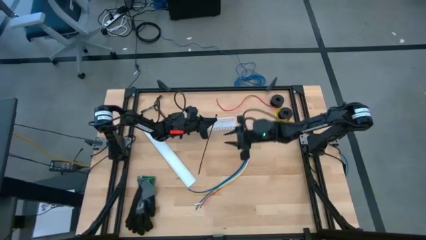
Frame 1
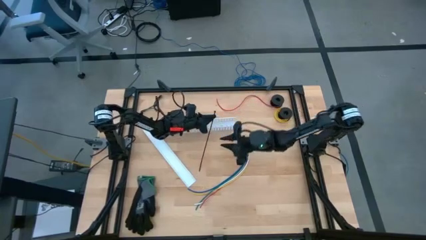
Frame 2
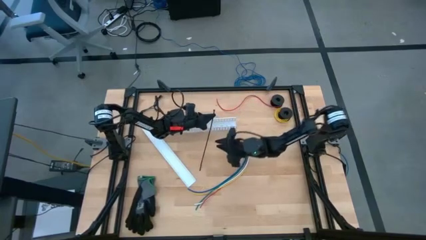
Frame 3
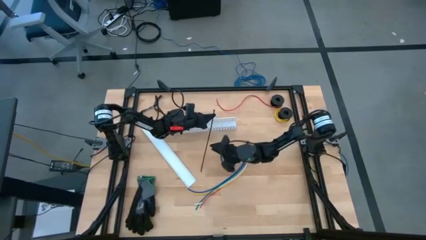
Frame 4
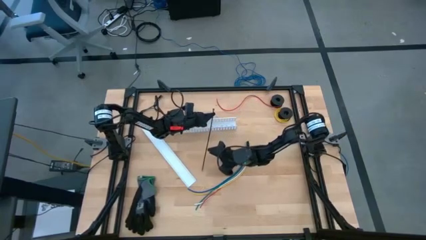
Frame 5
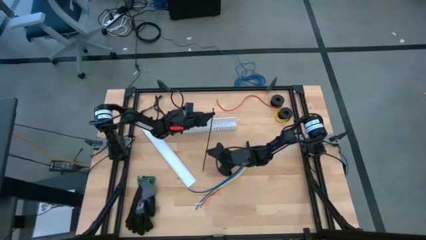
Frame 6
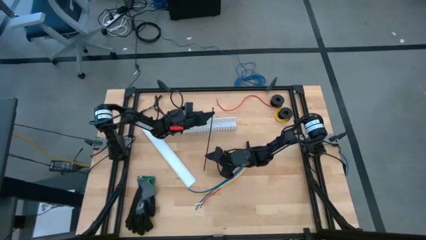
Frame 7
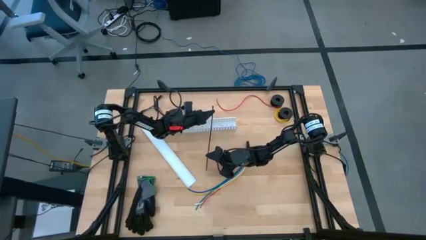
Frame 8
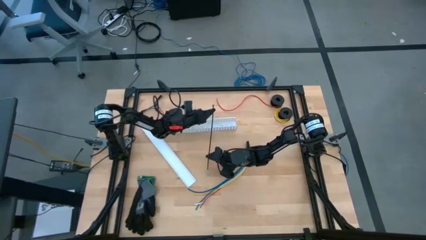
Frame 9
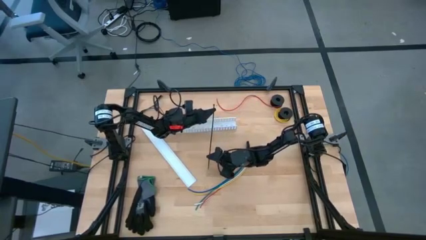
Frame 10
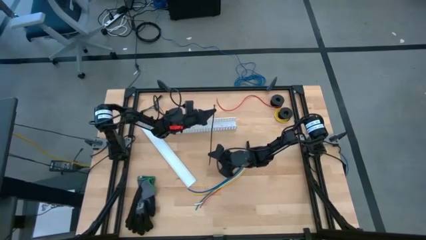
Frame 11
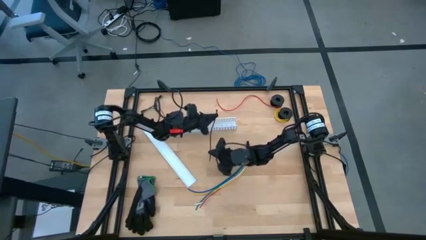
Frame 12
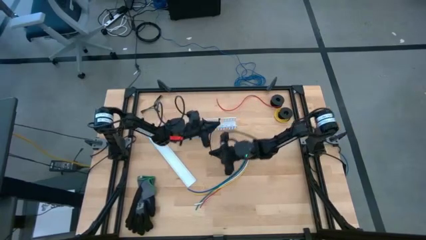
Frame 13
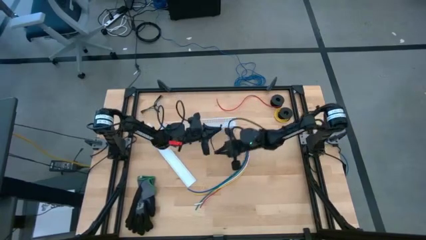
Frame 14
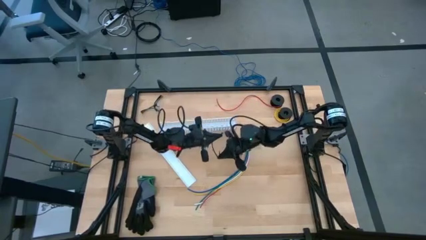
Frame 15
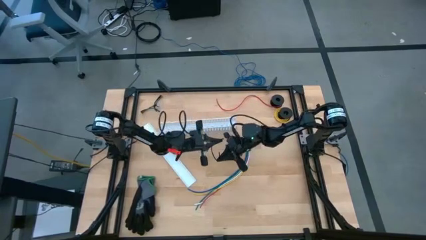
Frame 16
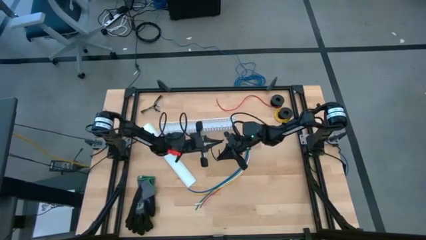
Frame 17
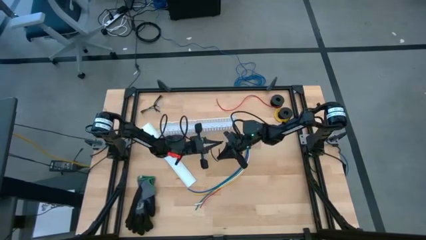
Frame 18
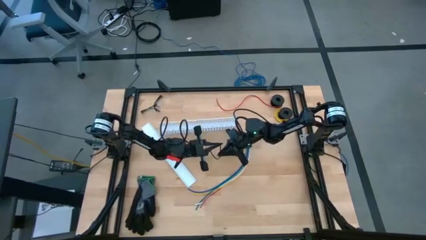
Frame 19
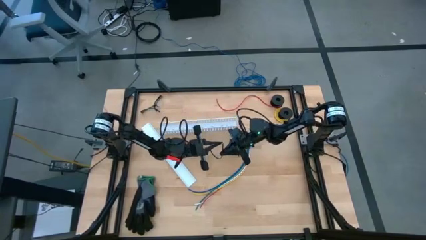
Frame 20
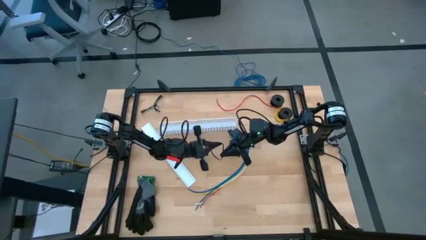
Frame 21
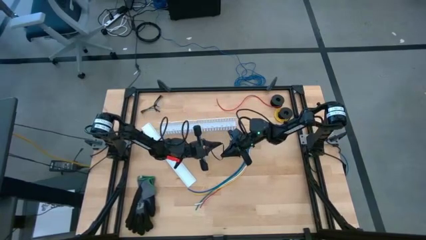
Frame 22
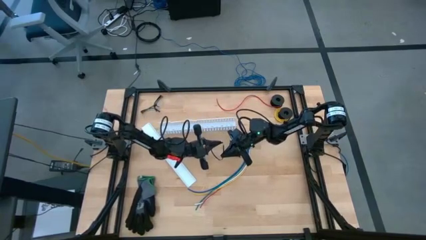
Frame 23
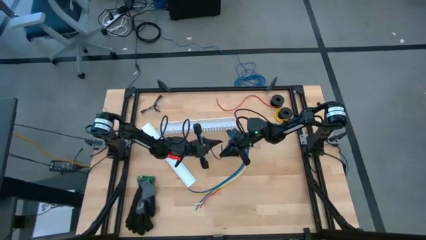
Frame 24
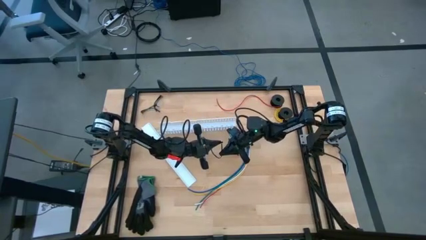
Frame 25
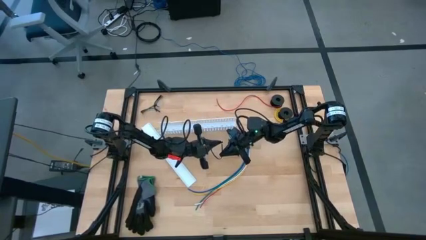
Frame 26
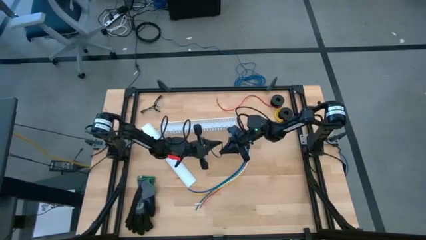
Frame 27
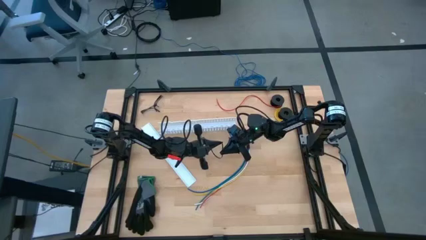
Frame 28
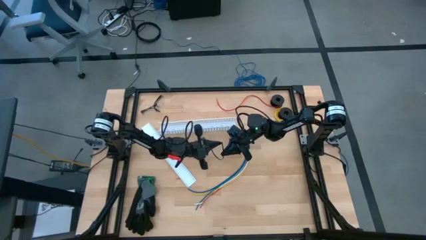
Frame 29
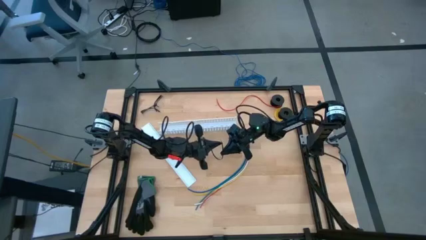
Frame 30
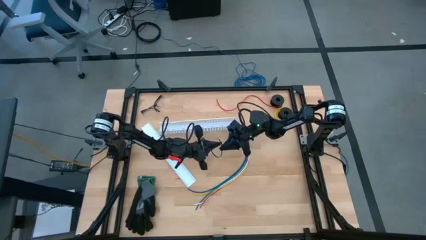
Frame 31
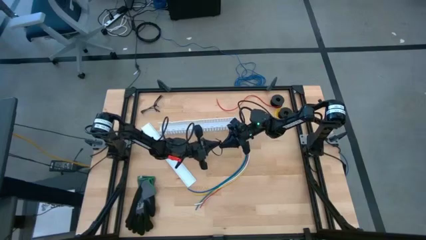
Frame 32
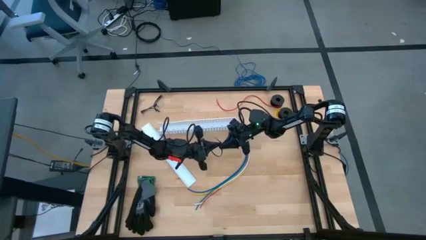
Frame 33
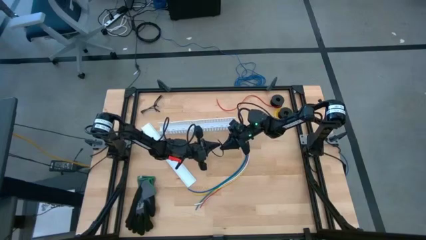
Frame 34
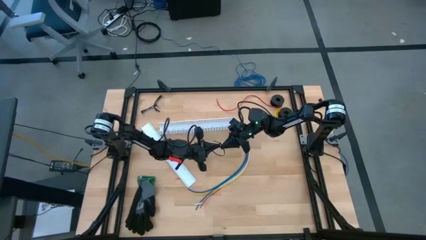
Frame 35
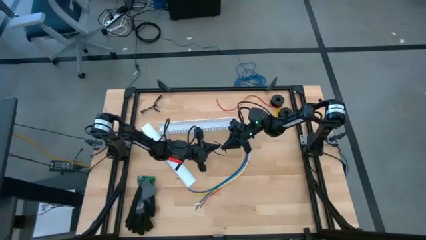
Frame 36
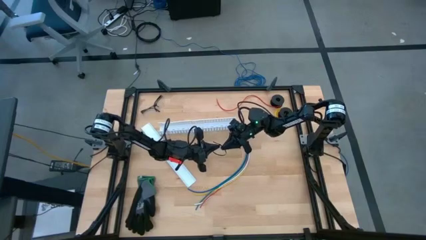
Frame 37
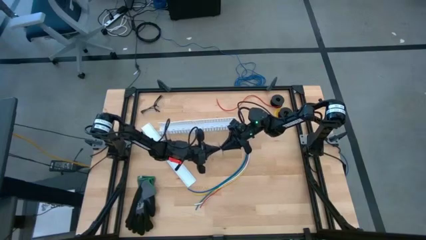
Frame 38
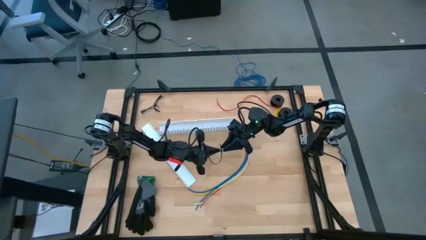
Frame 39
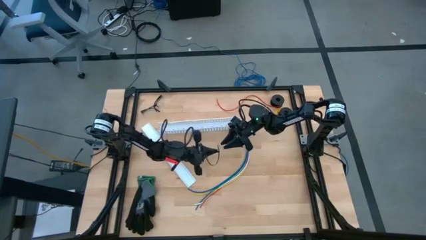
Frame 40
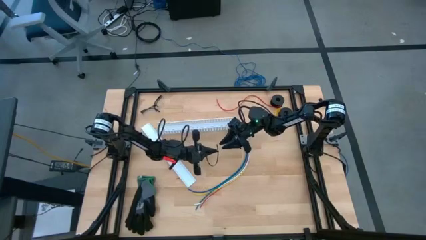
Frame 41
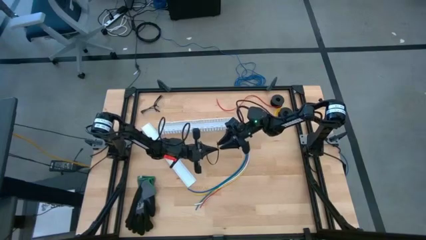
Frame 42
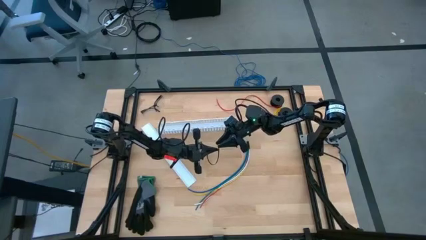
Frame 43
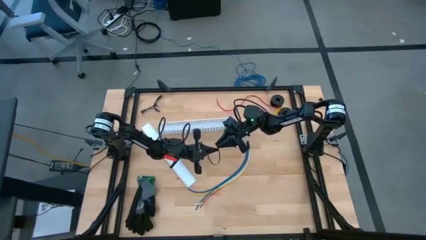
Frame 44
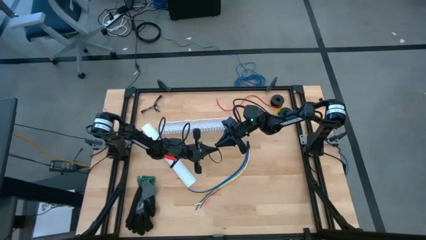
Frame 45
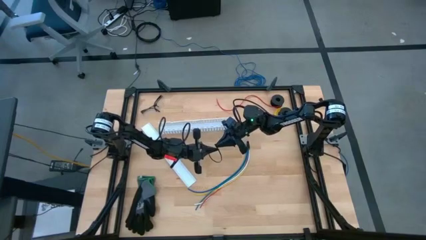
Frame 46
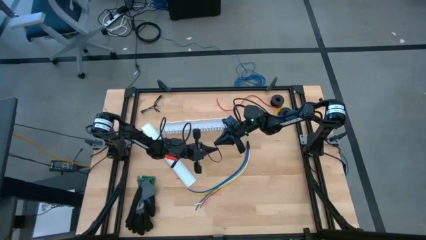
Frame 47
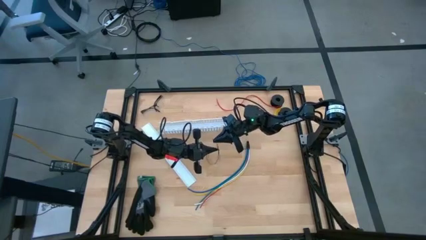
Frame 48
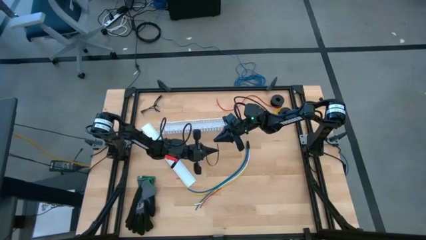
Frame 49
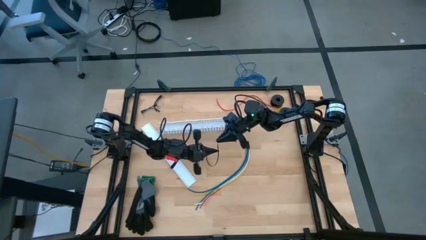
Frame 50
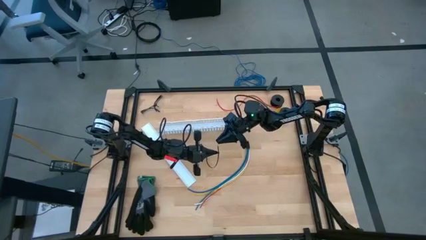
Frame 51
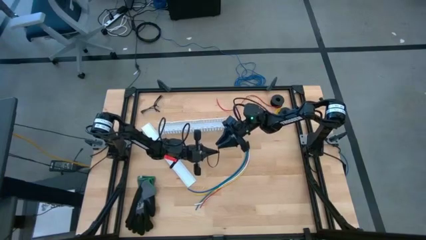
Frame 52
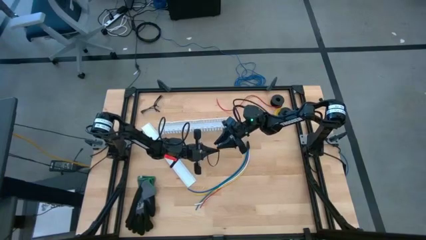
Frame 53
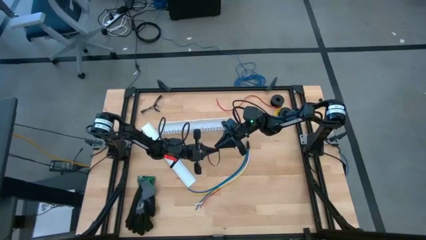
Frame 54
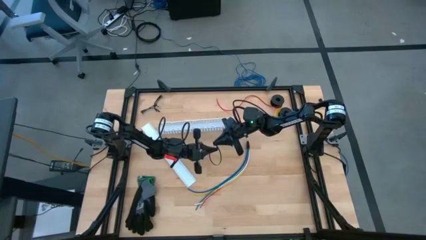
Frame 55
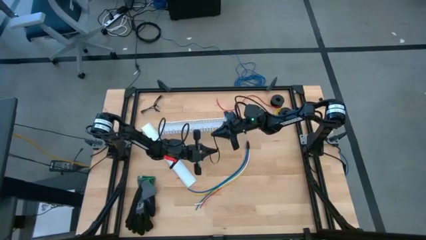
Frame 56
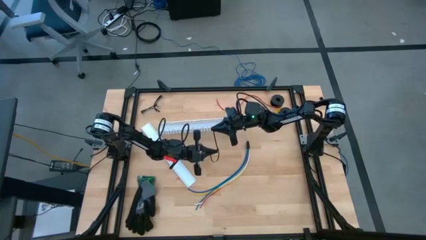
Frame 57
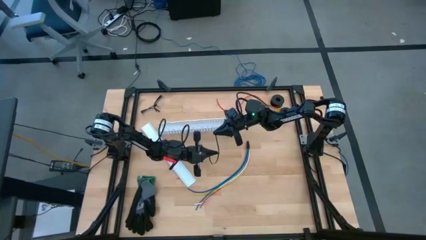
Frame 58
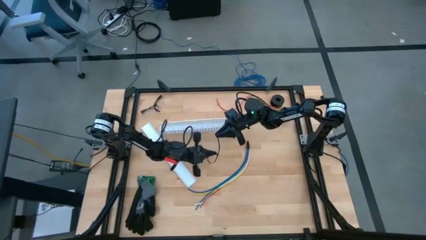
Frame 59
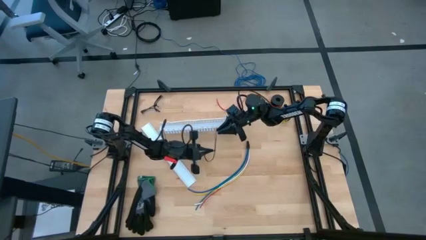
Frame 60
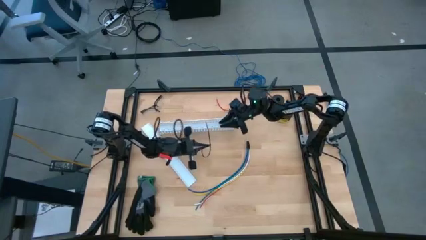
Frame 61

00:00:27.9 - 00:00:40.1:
Task: Ziptie cables
Prepare the black zip tie

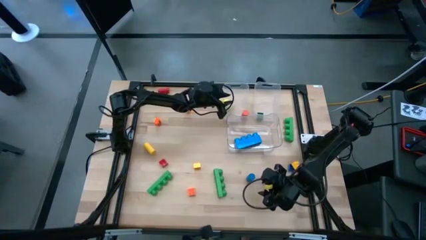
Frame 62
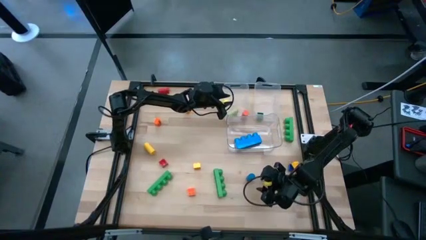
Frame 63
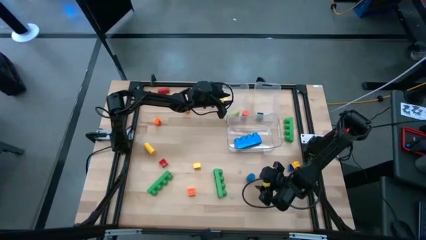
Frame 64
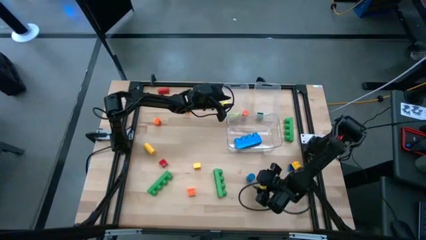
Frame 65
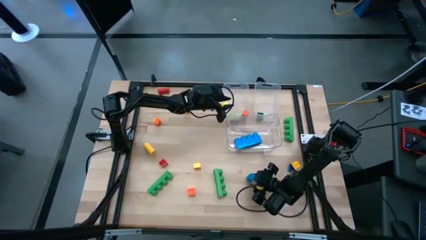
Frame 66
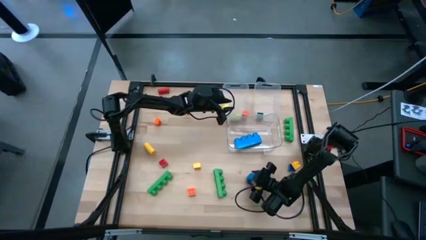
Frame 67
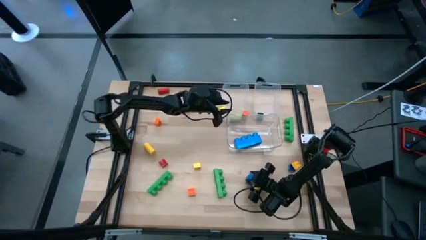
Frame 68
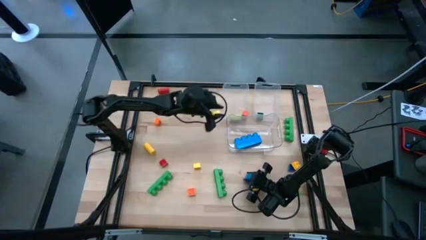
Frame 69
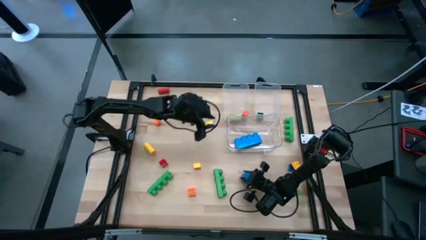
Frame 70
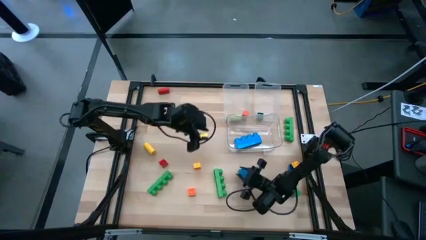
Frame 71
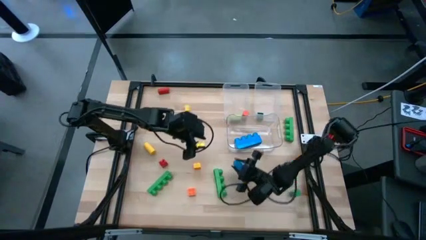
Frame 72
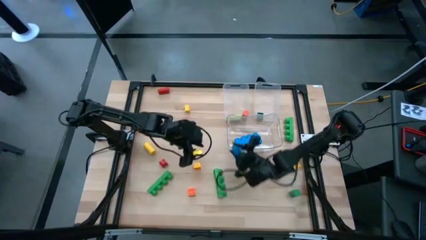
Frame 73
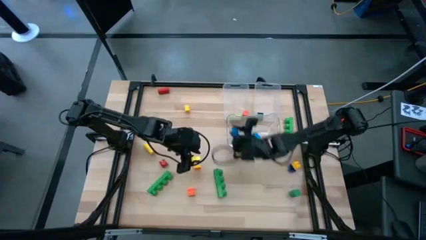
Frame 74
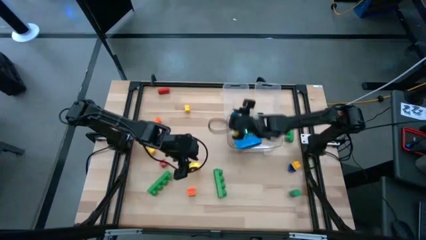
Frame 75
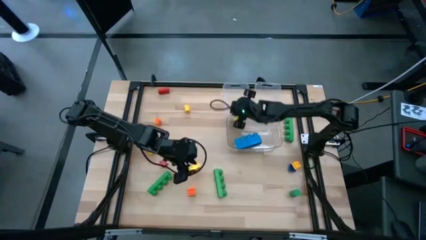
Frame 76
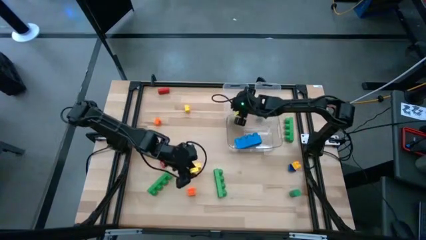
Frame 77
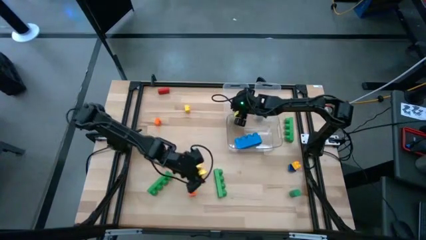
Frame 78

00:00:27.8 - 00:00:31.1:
Task: Sort blocks by size
Put the blue cylindrical block into the left transparent bin

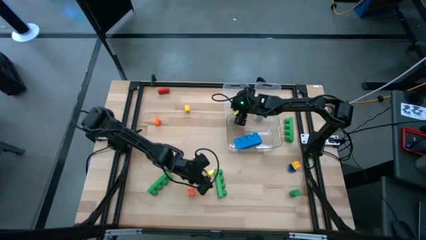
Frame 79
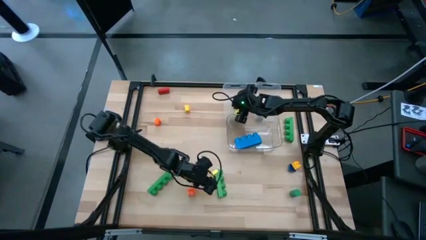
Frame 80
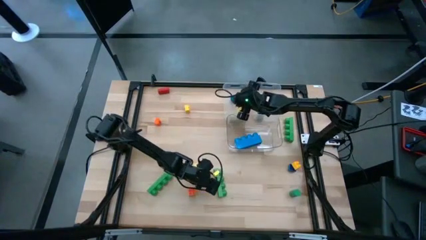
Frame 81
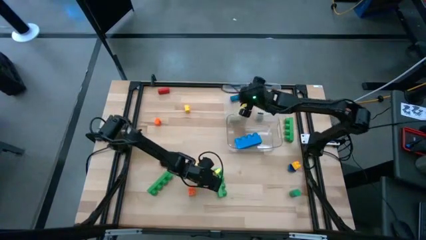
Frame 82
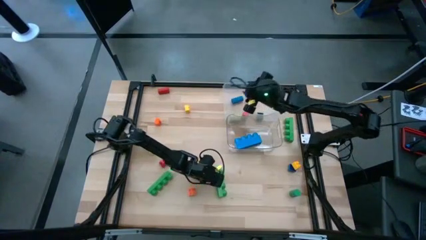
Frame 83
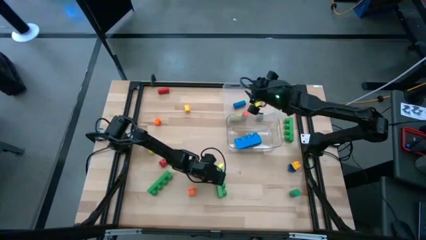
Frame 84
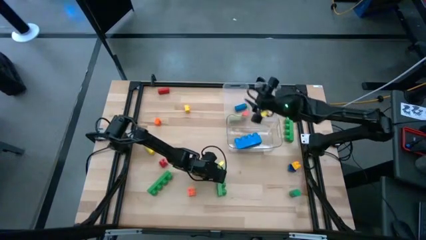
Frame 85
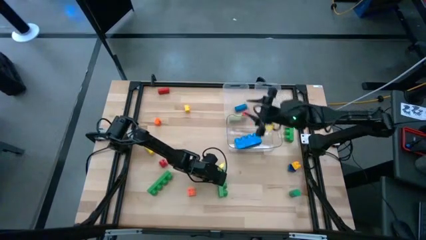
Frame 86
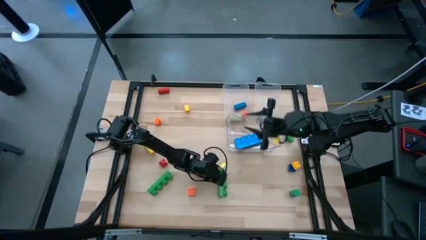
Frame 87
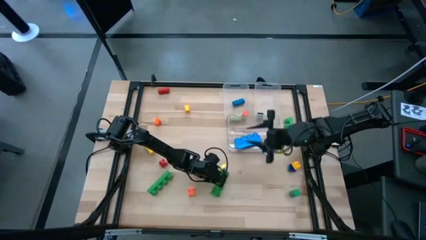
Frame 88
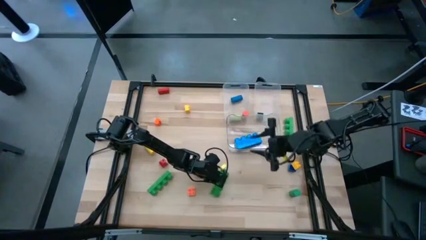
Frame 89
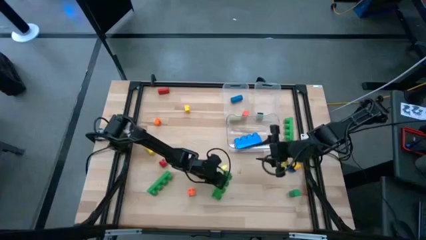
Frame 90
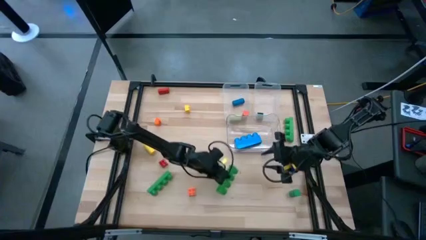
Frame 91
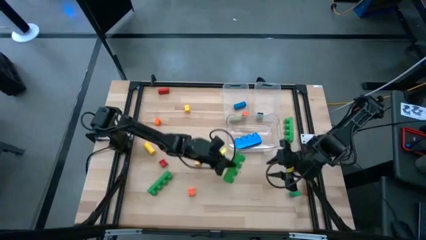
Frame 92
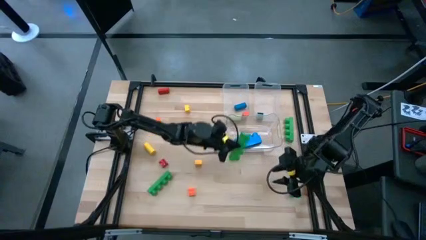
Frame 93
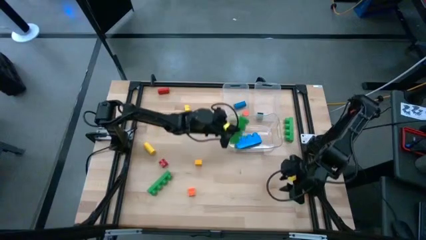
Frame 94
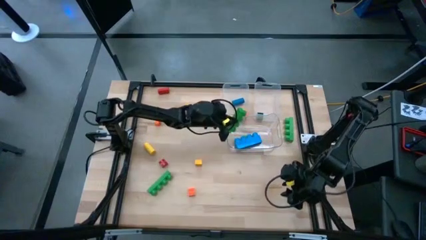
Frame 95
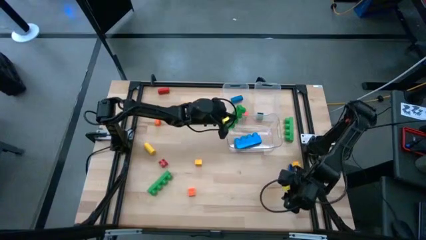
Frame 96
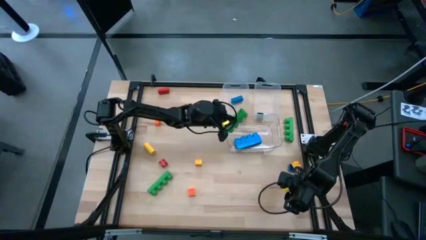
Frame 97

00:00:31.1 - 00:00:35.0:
Put the bottom right large green 4 stud game piece into the bottom transparent bin
